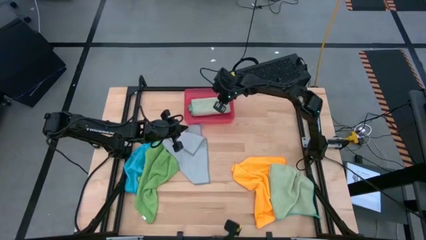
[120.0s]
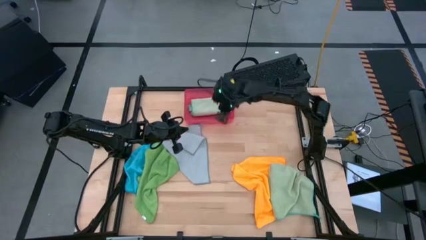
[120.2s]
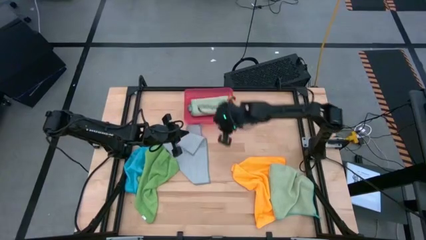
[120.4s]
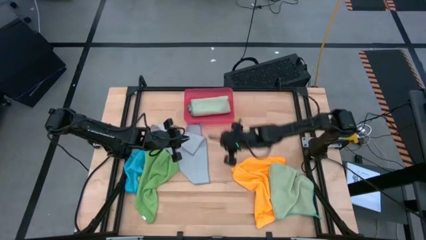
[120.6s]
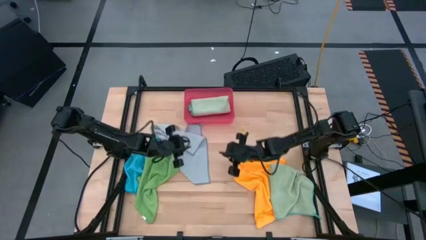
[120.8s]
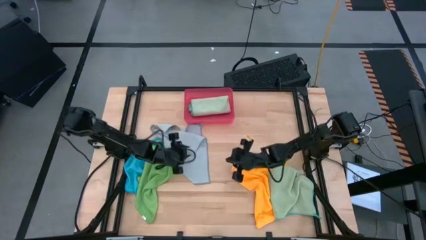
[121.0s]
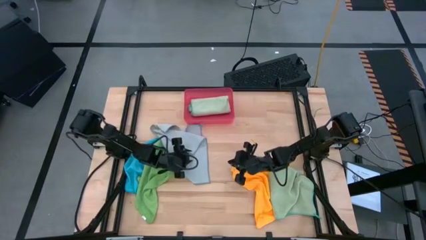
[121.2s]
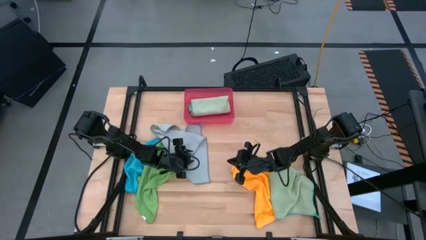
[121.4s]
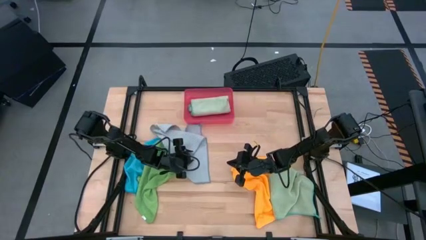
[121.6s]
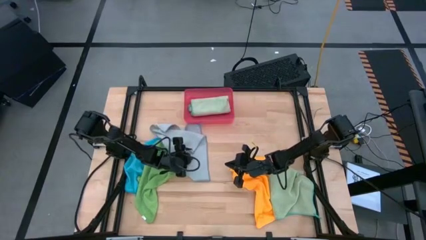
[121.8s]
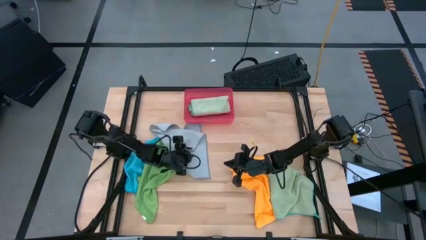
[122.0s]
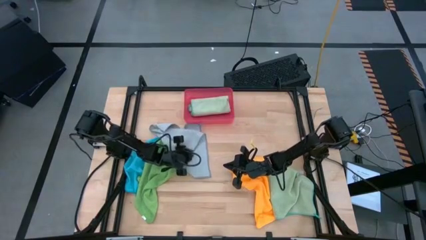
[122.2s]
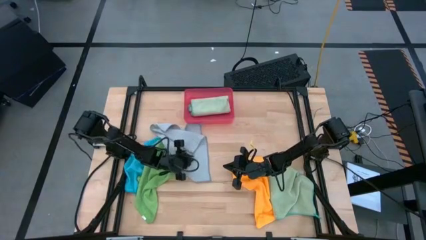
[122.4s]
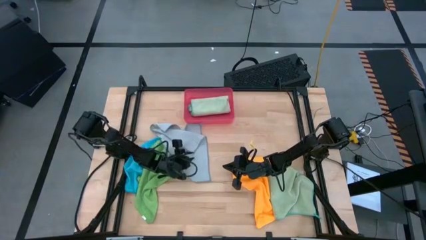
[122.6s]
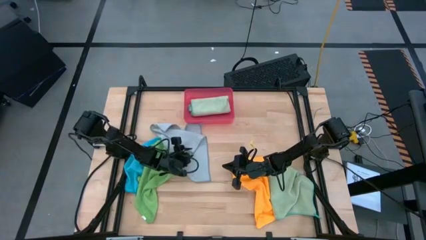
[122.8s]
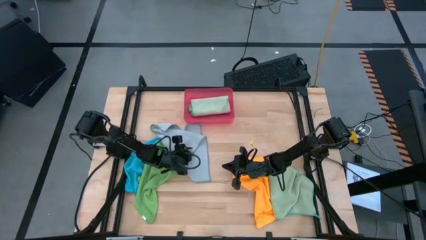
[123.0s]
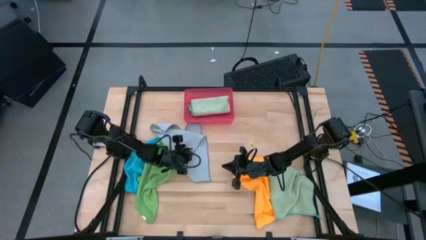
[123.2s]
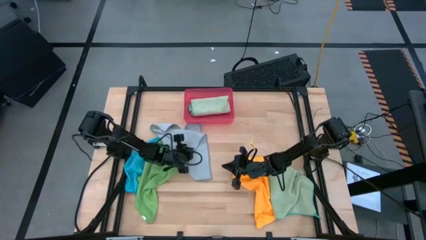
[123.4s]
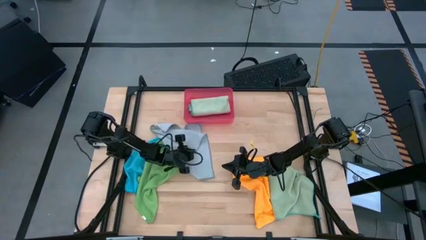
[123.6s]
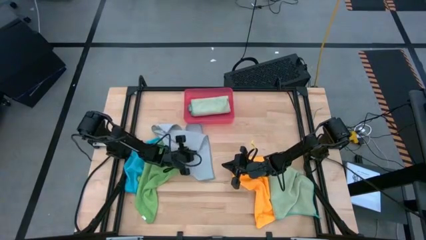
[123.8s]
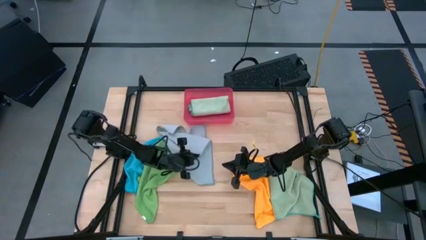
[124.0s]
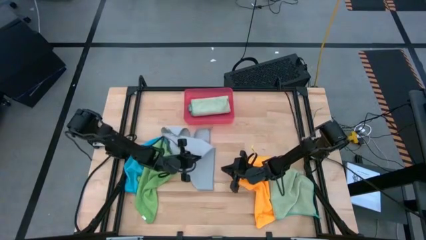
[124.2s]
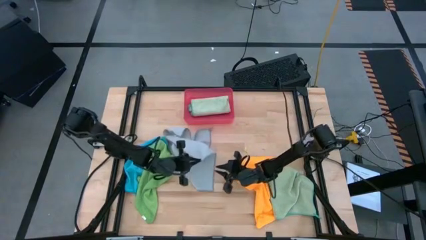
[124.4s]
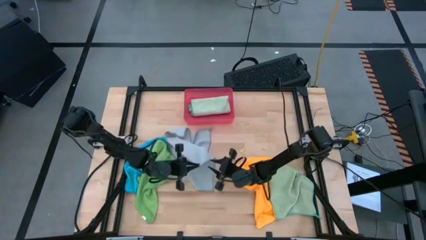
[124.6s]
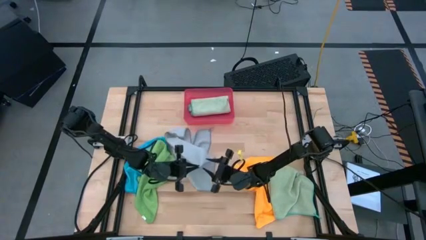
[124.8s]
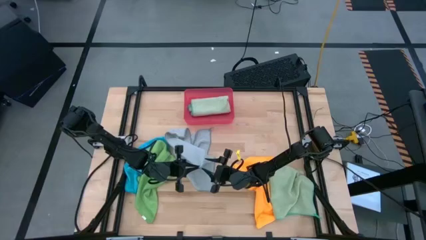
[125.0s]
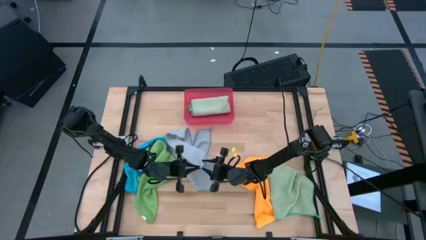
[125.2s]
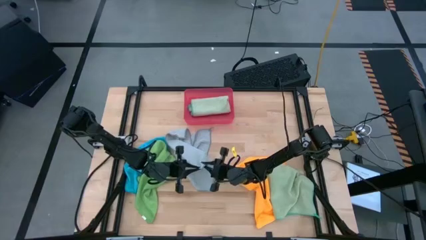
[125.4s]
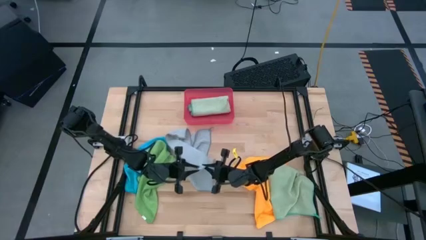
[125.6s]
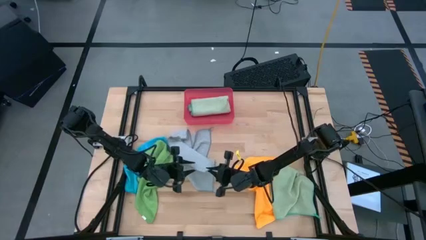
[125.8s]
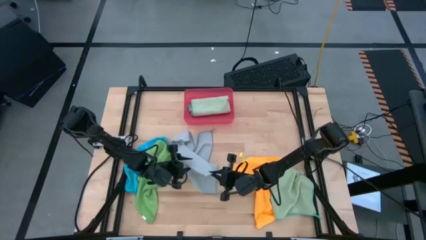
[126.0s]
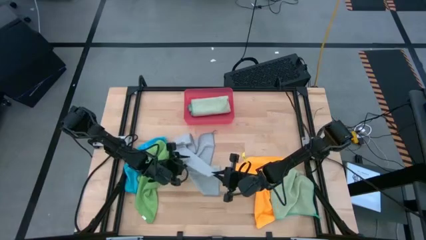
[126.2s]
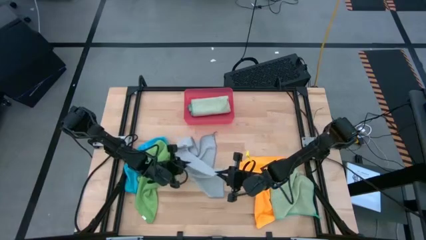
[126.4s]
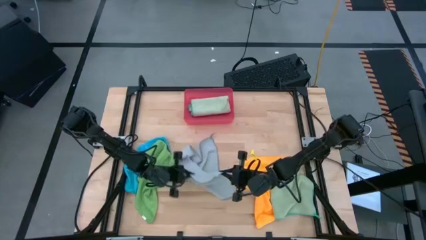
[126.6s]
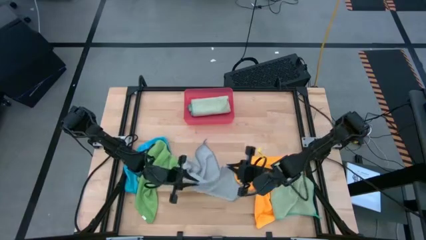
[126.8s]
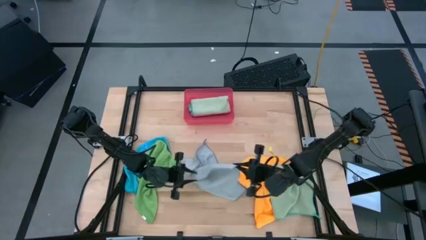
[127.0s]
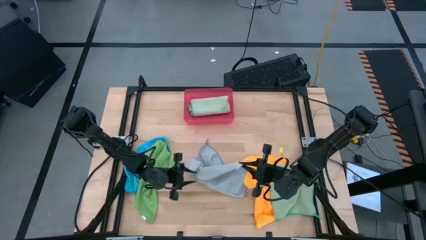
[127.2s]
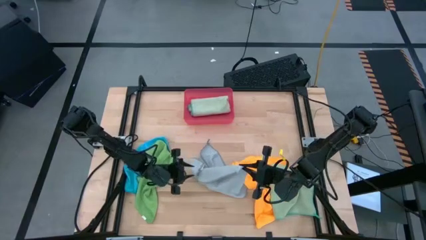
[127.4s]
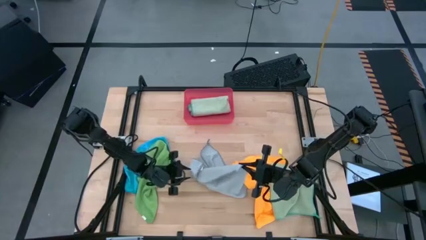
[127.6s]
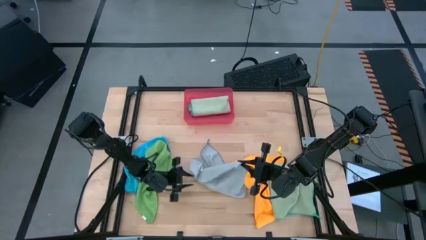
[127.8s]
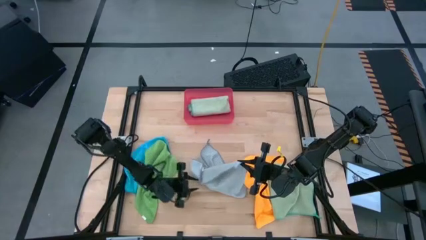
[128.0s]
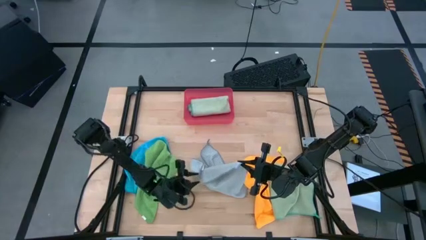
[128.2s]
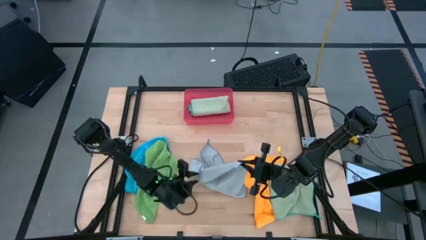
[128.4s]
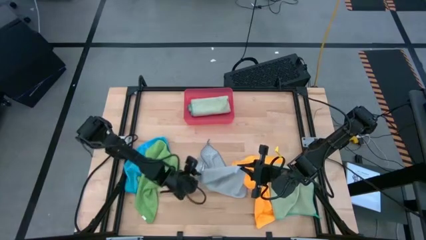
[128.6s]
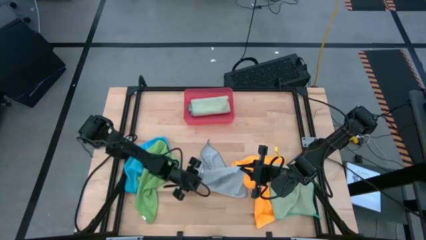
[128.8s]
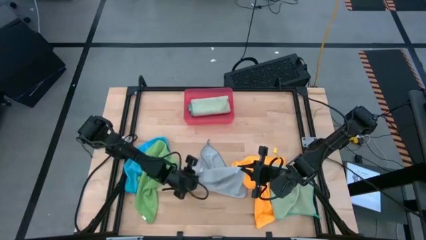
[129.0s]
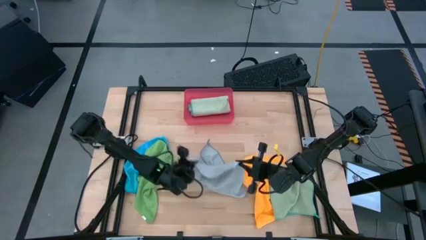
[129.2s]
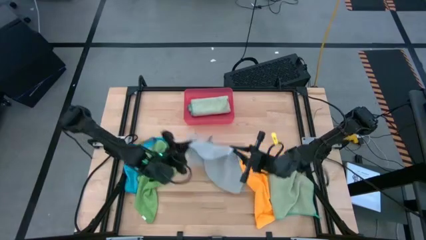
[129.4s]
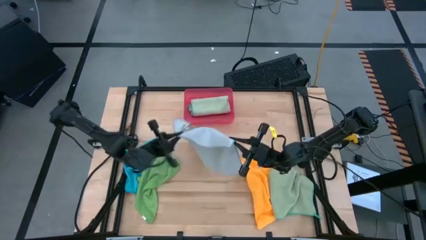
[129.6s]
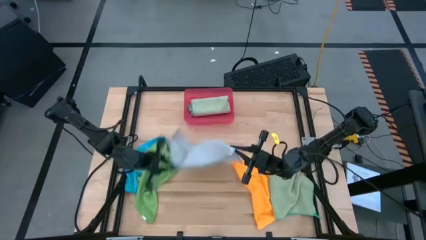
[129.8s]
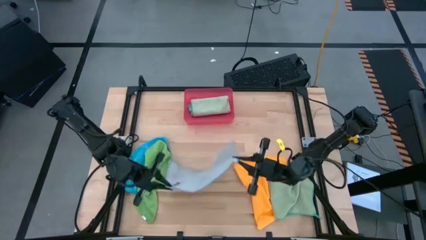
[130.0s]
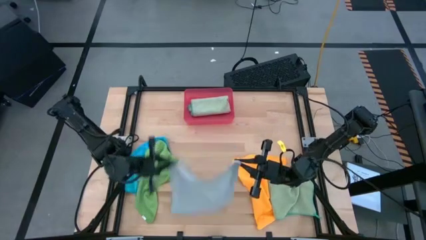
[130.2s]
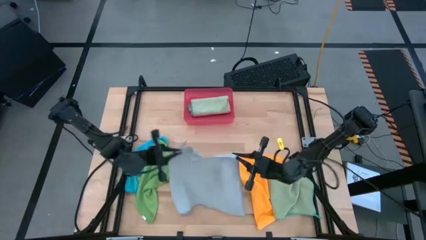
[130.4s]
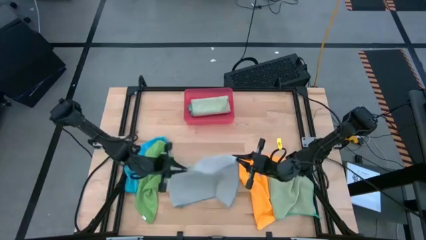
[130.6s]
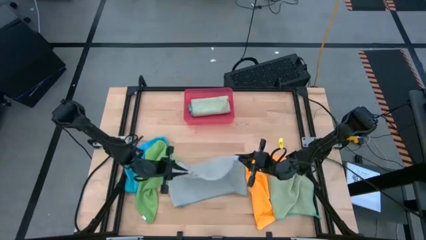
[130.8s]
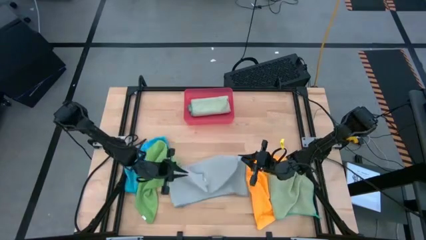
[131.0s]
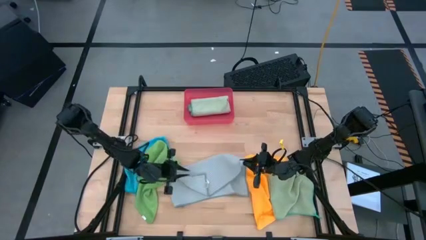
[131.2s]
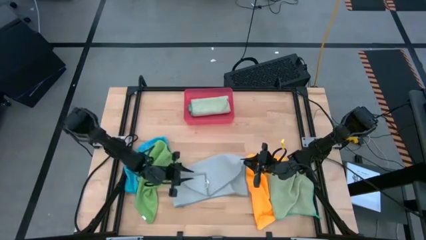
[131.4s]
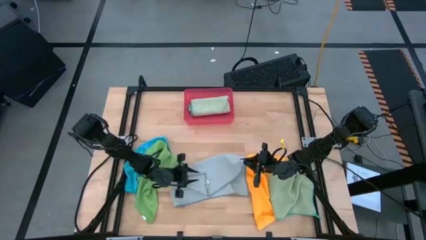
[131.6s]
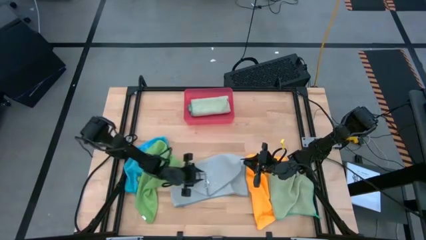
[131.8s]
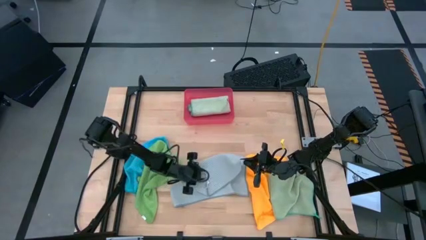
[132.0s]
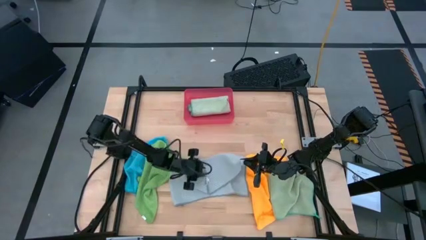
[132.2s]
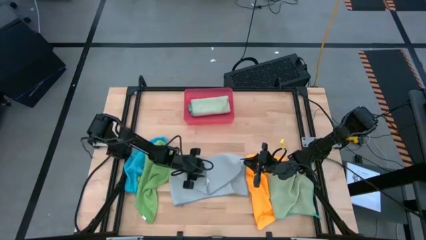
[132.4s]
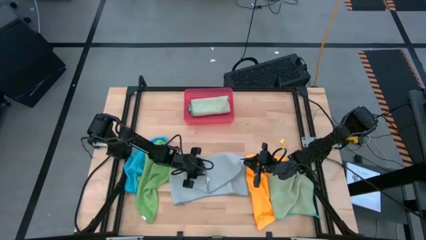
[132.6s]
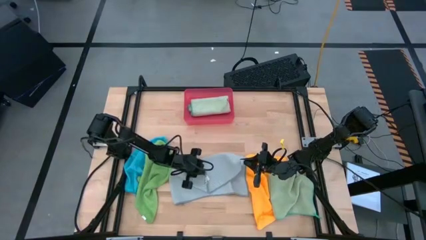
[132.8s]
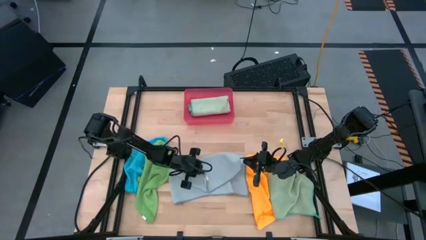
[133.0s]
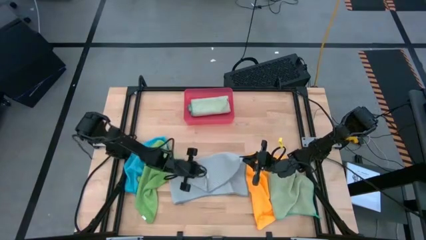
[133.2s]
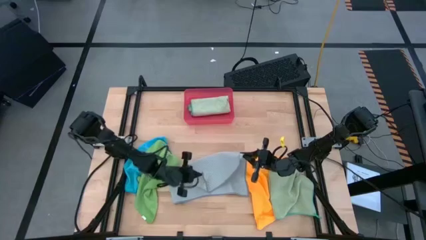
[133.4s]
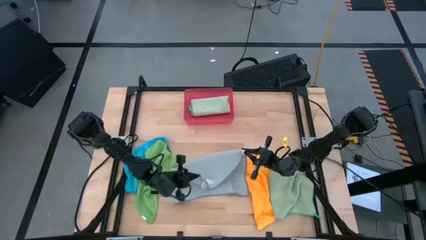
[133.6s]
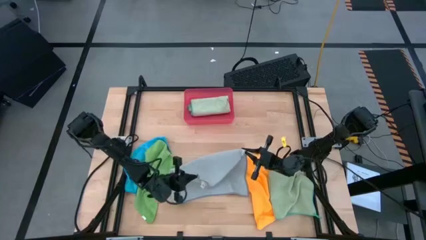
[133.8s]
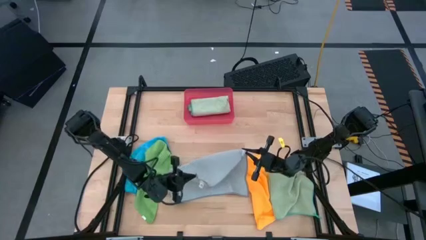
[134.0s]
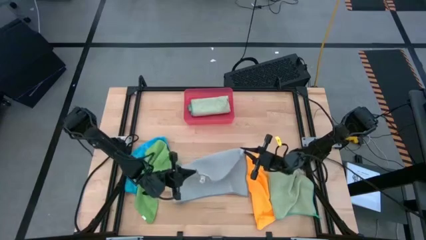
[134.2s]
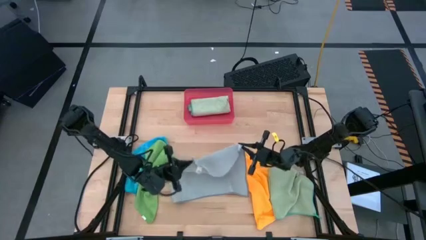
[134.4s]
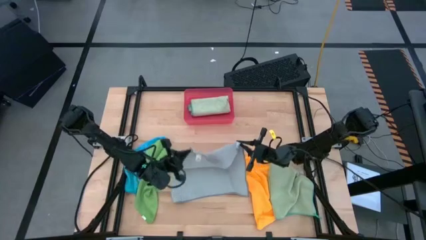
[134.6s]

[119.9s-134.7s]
Task: Fold microfiber towels
Fold the gray towel
